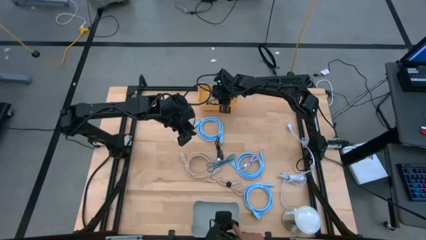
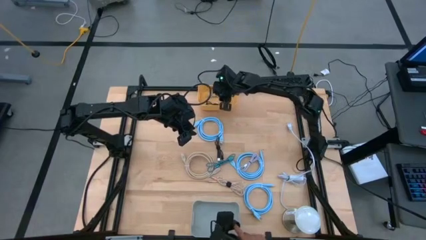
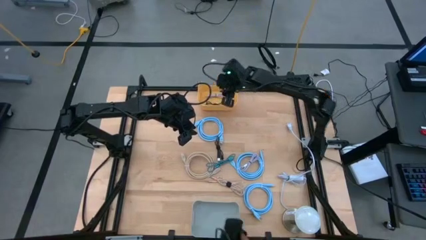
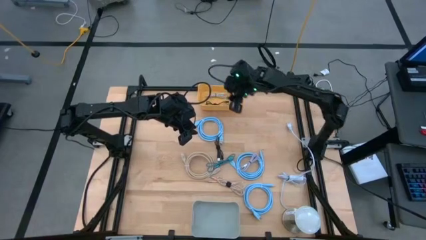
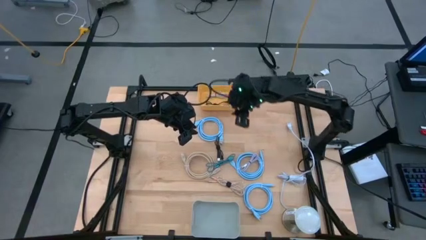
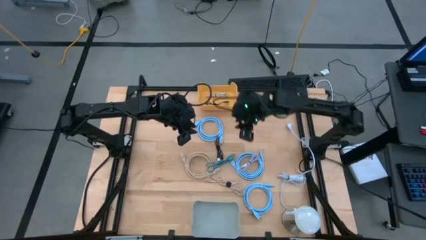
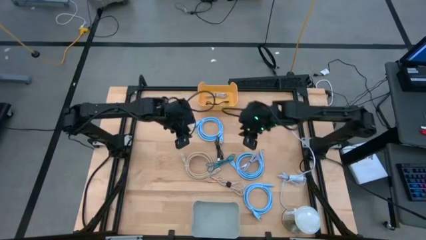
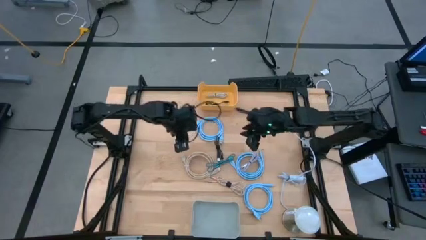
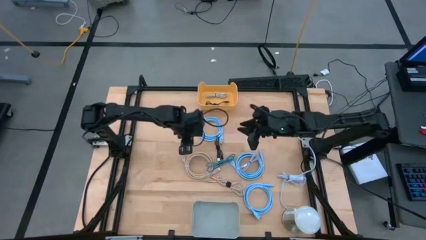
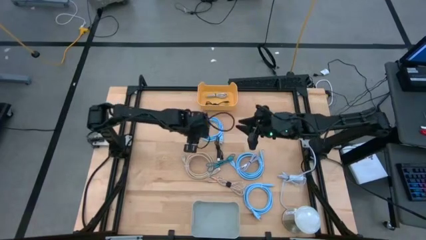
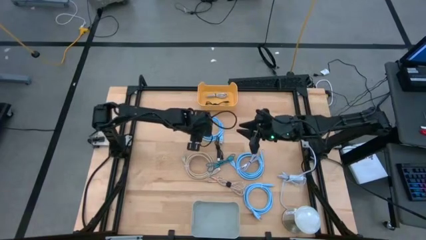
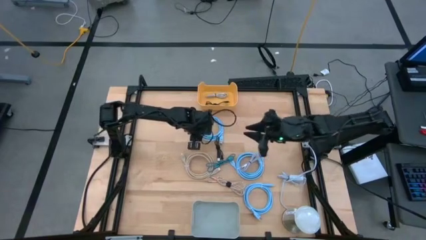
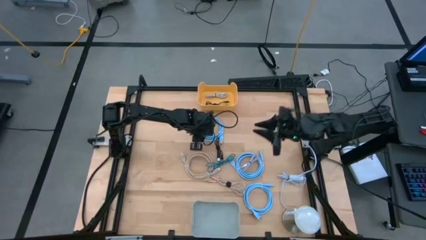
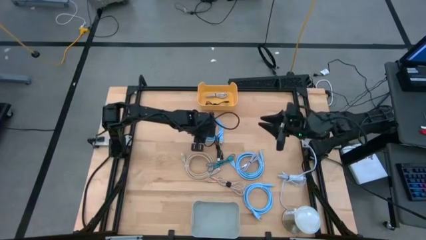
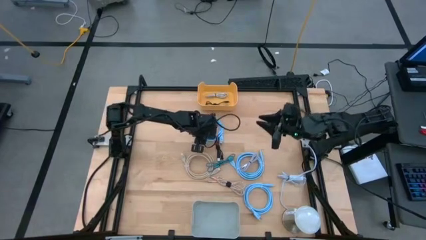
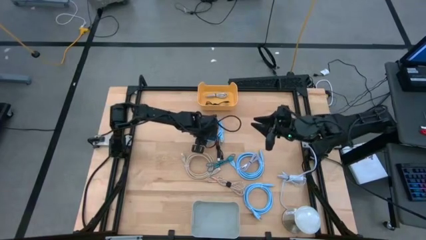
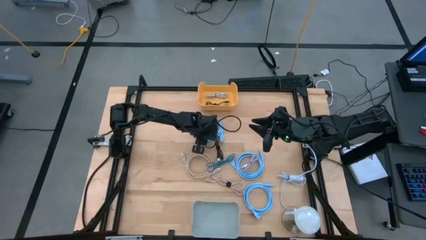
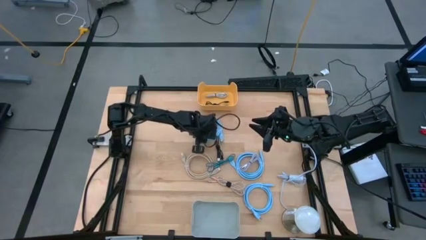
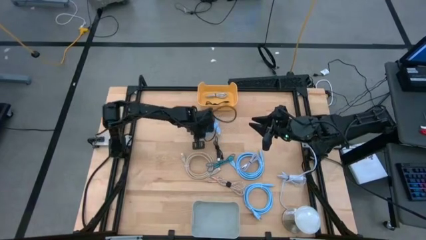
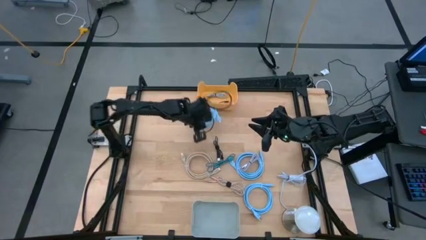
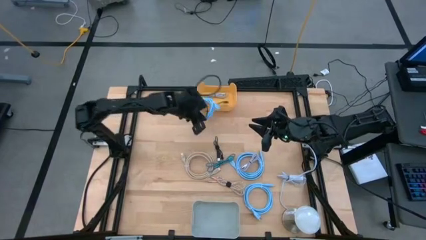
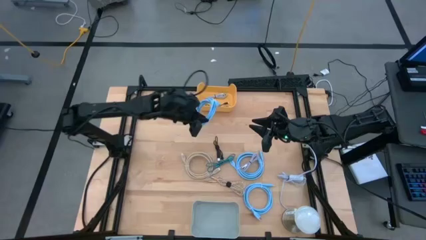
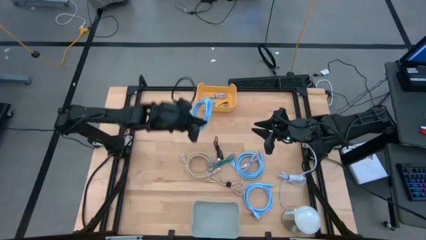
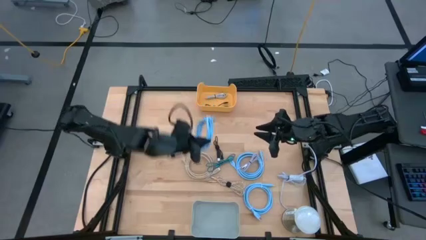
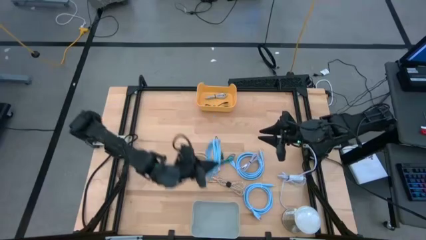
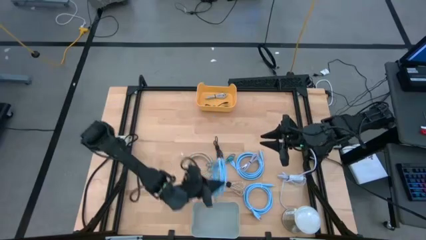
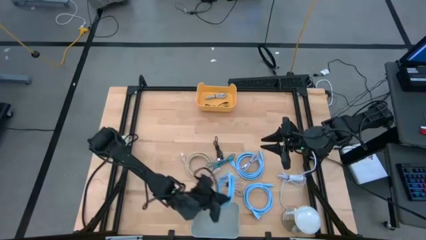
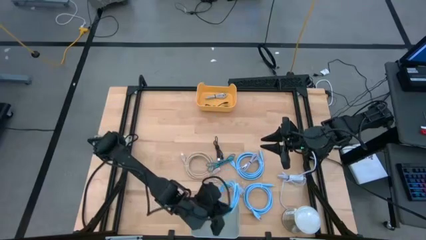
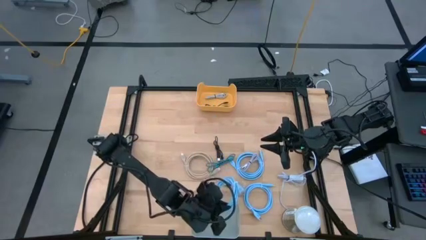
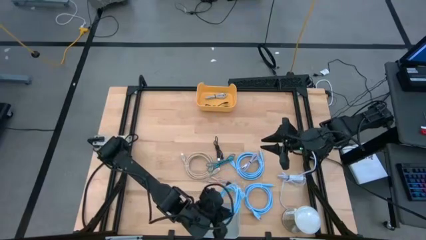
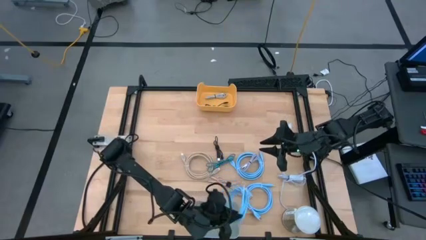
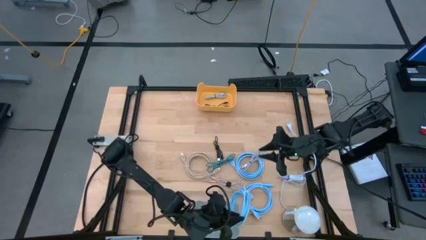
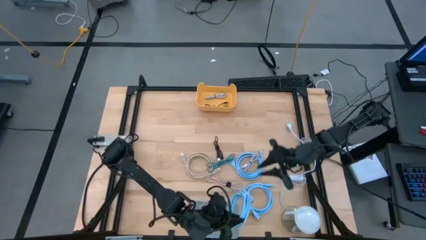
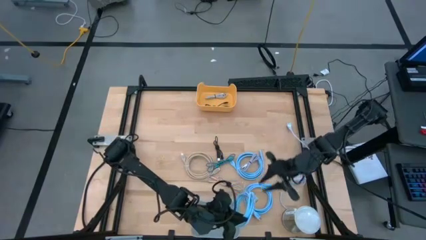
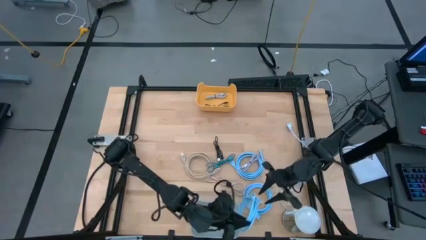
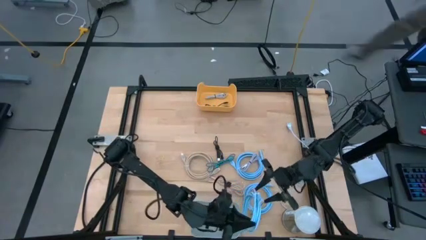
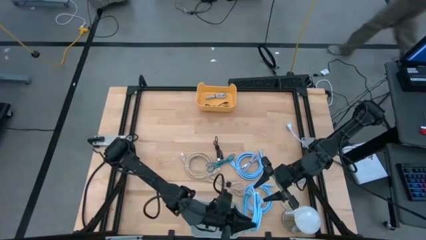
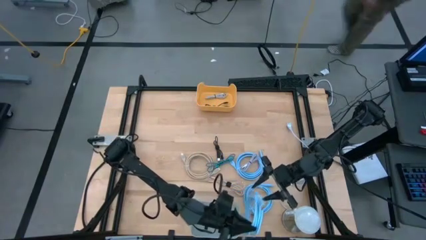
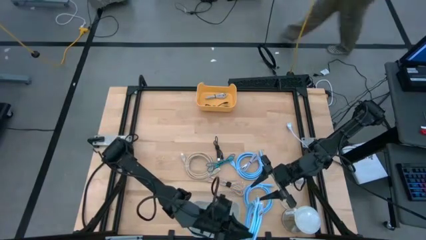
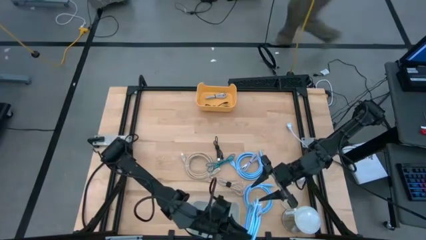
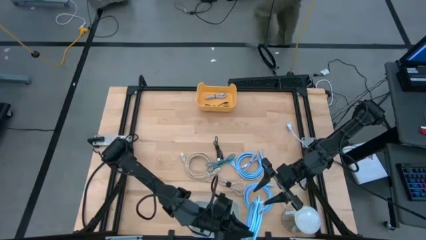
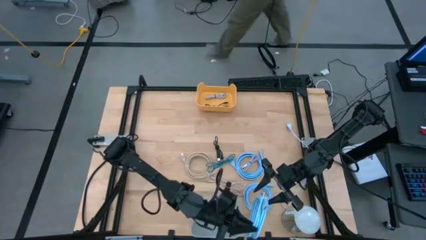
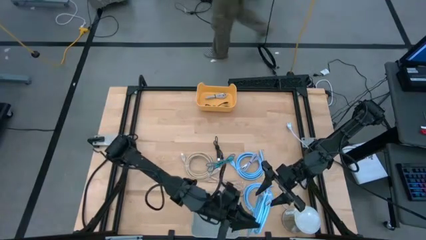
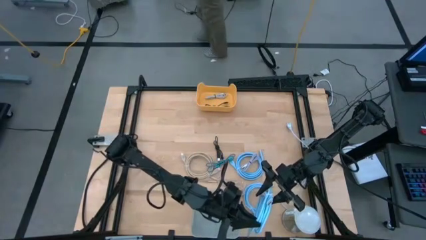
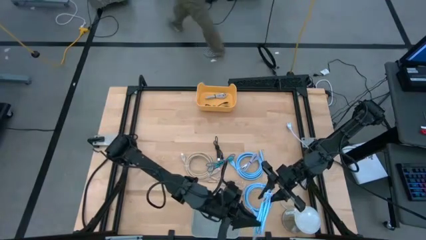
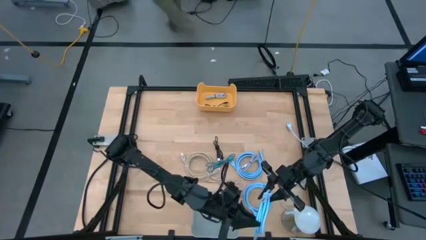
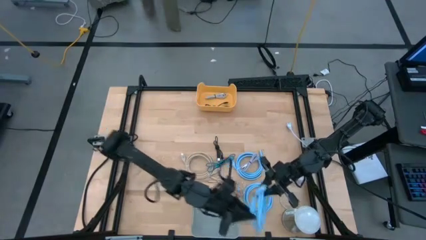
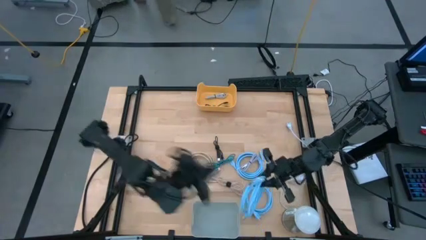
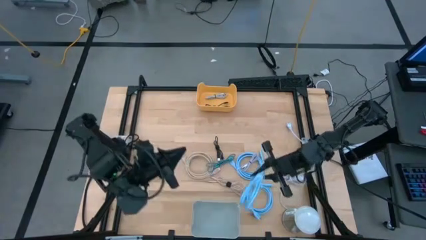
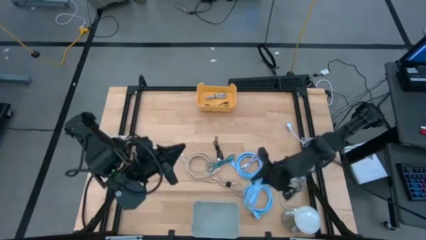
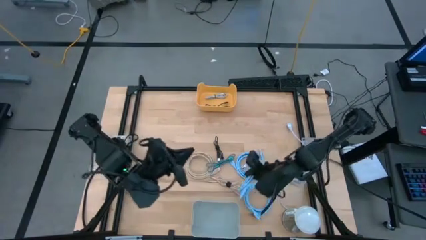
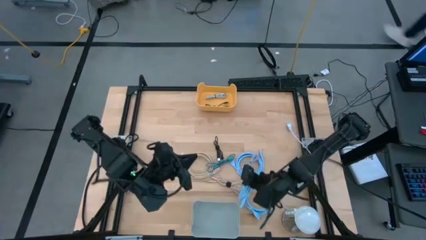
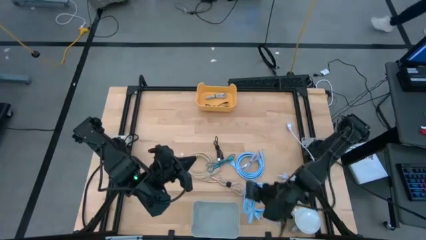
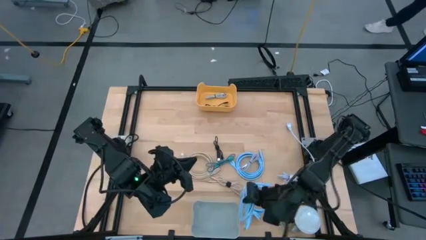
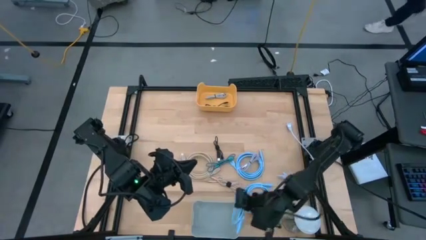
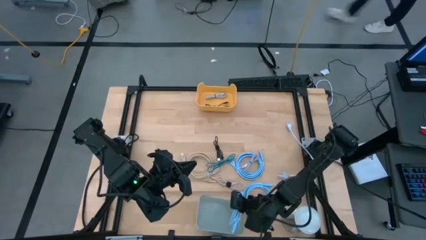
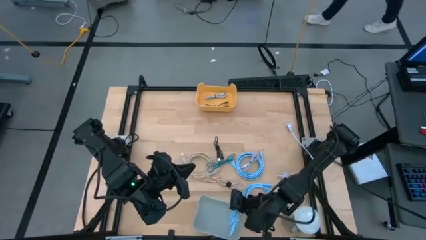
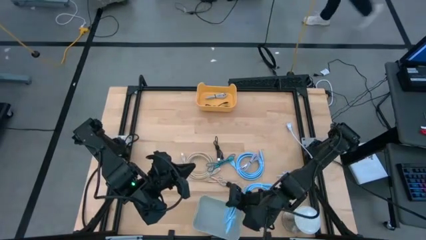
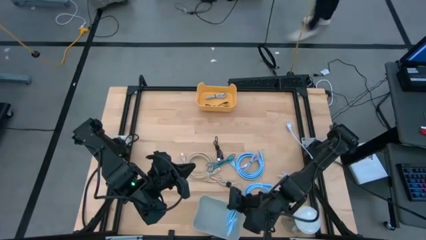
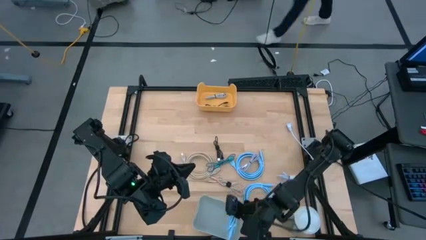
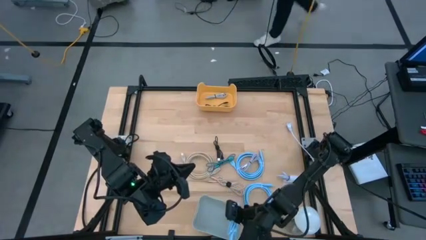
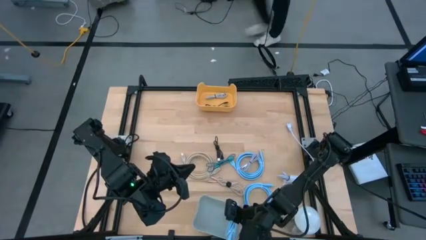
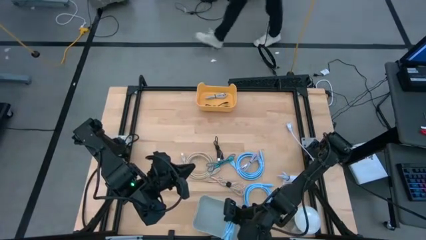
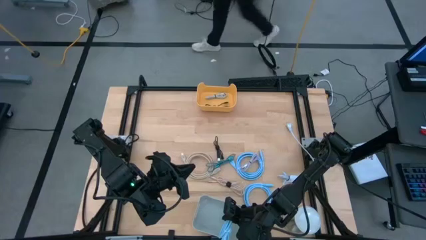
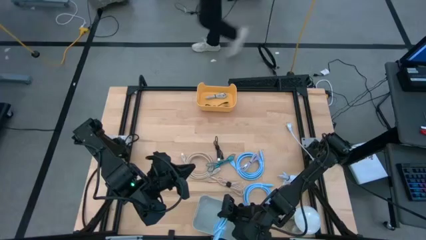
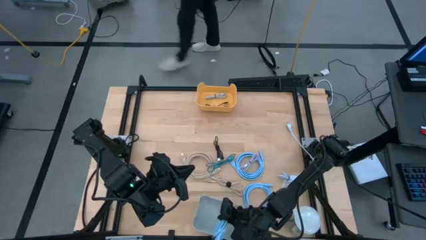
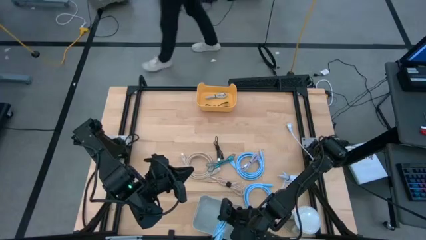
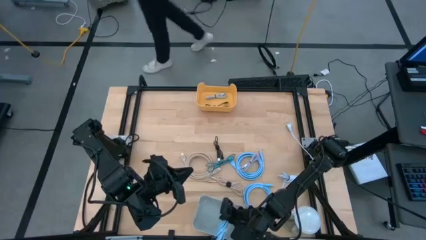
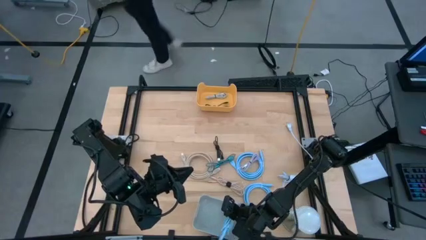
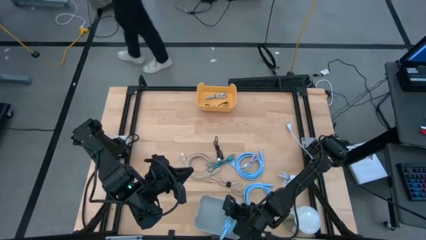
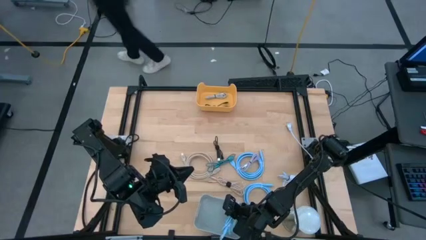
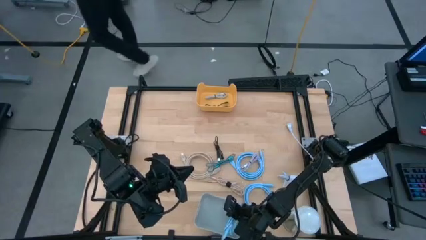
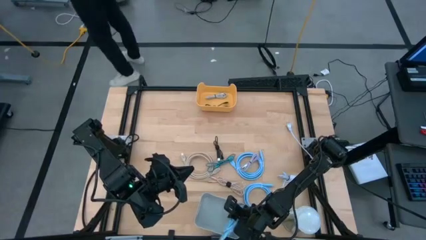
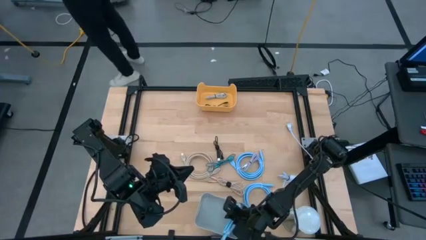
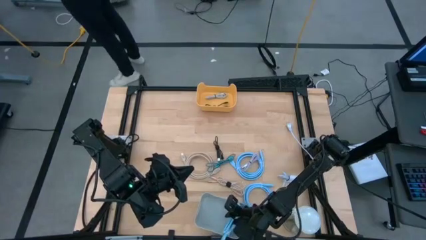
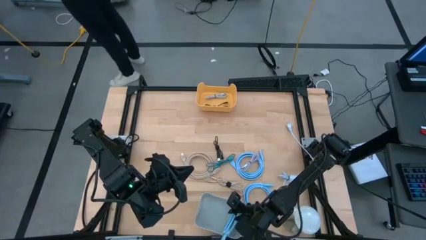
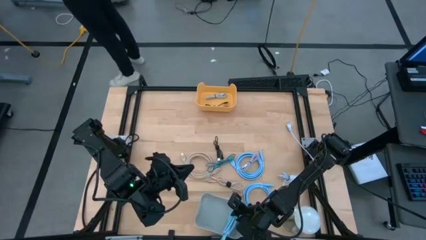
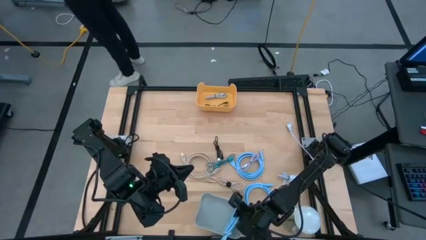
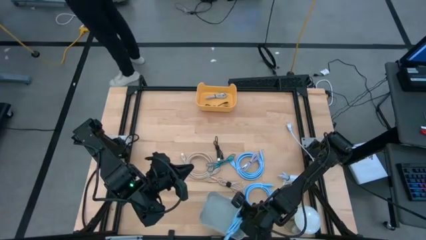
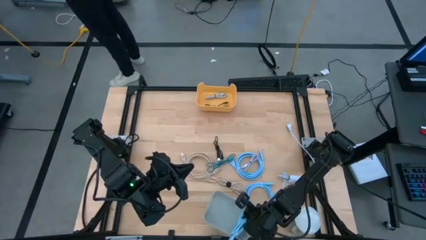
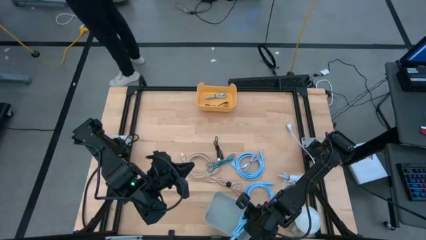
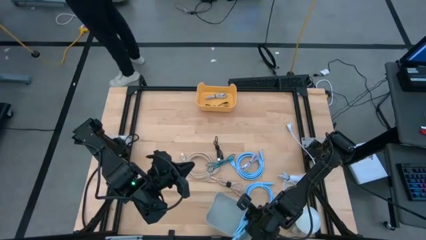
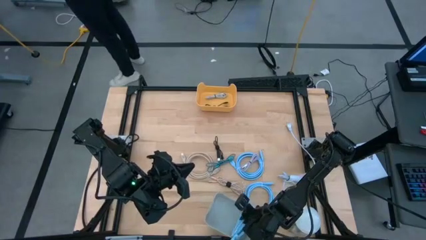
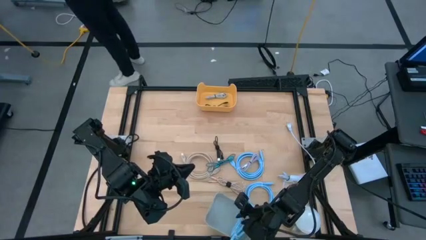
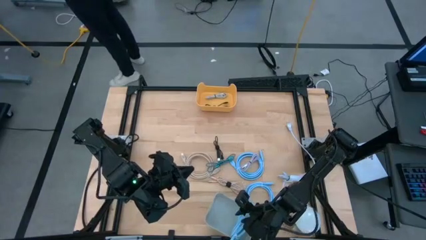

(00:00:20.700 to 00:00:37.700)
Task: Sort cables into bins
Put the blue HDMI cable into the gray bin
